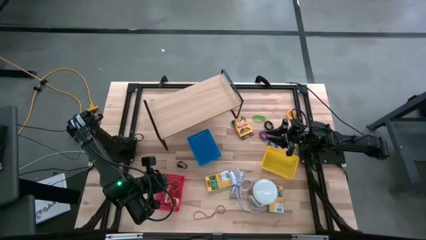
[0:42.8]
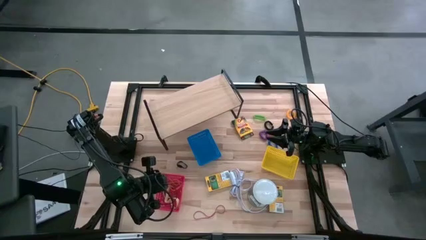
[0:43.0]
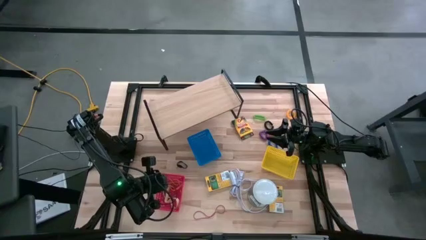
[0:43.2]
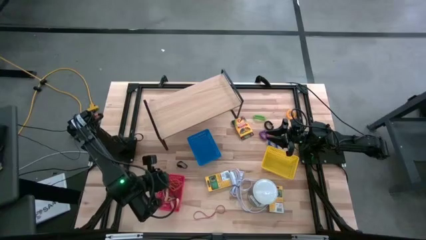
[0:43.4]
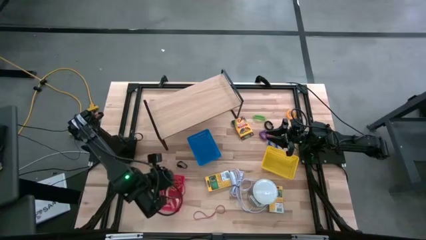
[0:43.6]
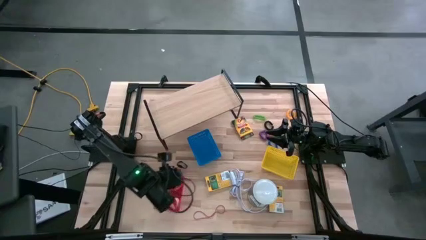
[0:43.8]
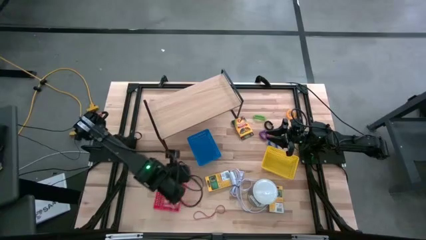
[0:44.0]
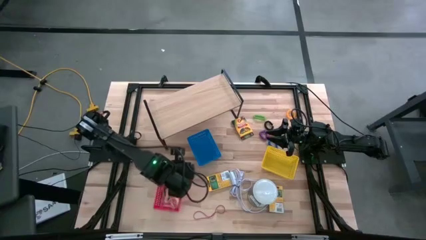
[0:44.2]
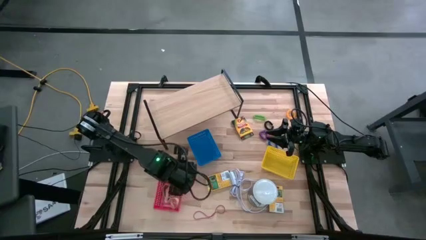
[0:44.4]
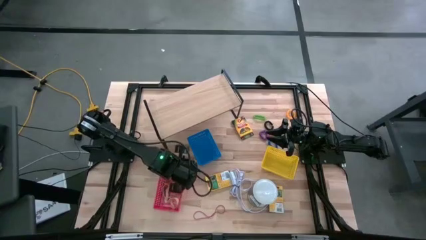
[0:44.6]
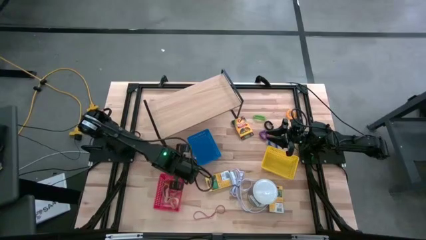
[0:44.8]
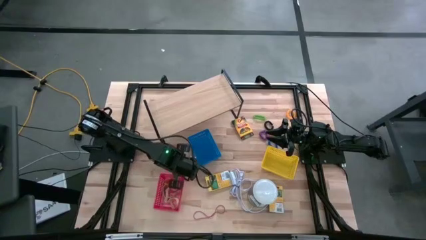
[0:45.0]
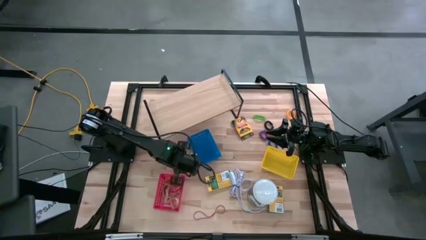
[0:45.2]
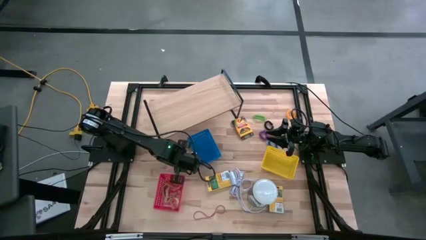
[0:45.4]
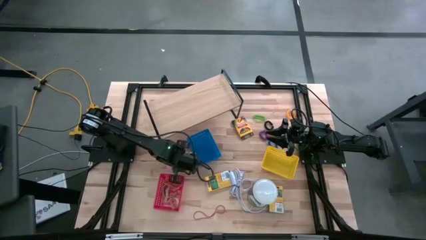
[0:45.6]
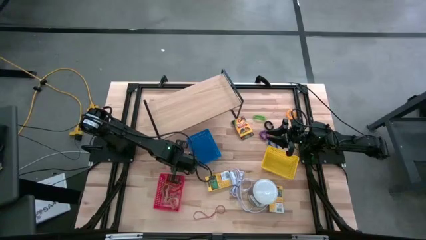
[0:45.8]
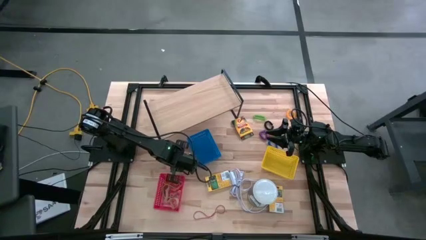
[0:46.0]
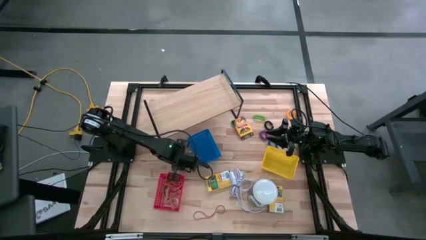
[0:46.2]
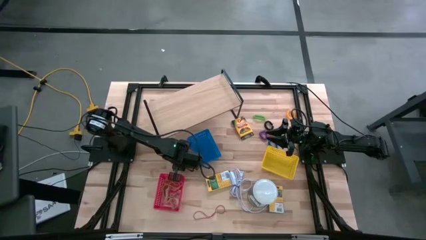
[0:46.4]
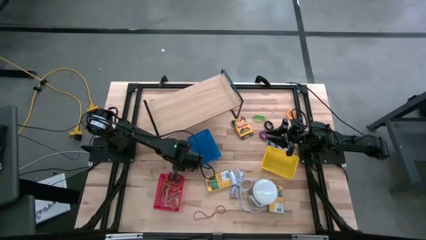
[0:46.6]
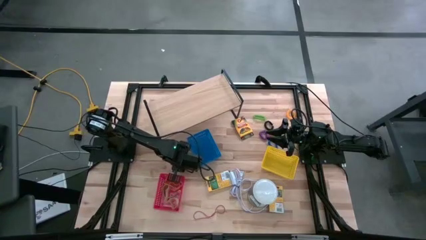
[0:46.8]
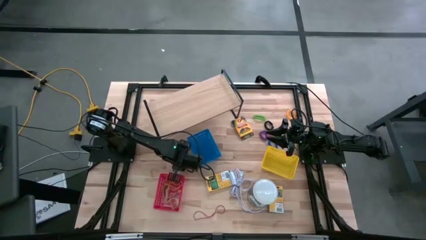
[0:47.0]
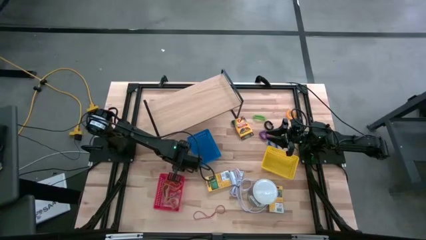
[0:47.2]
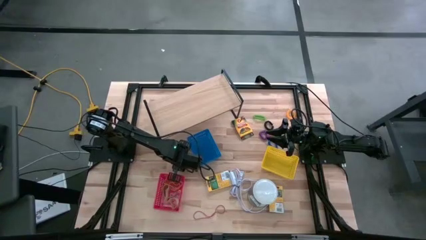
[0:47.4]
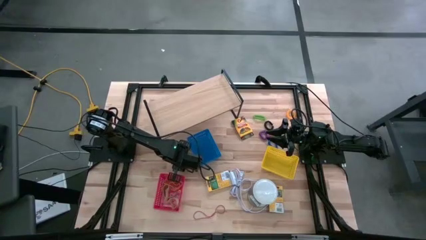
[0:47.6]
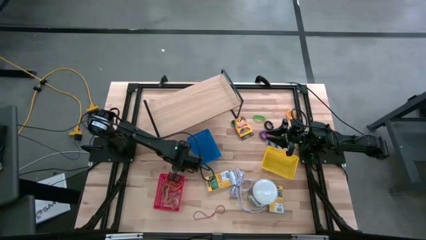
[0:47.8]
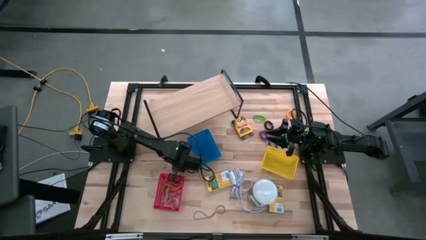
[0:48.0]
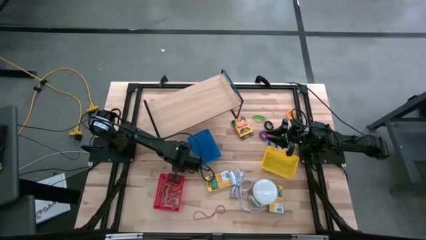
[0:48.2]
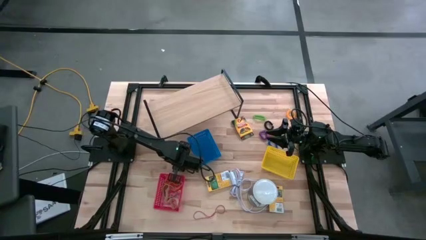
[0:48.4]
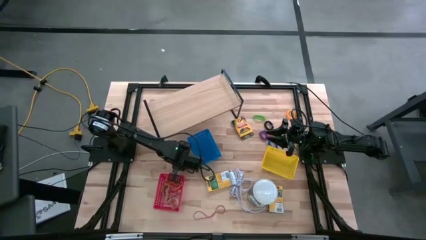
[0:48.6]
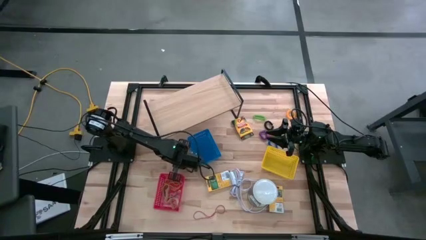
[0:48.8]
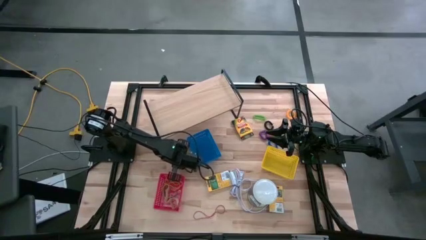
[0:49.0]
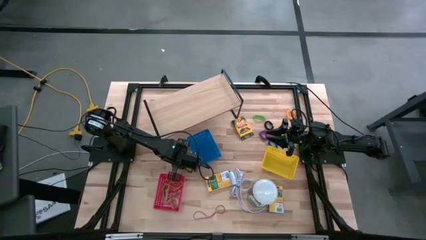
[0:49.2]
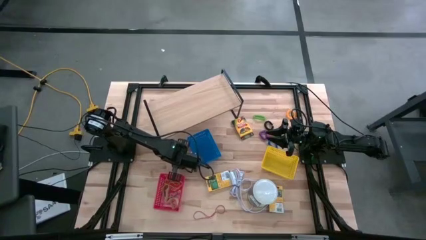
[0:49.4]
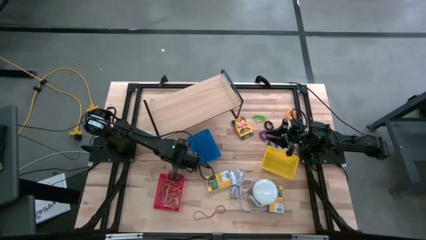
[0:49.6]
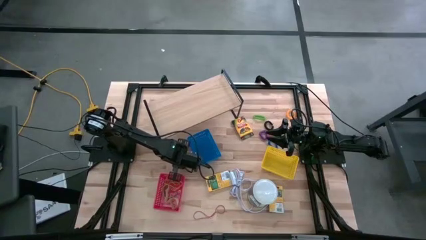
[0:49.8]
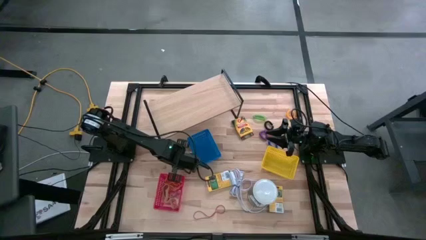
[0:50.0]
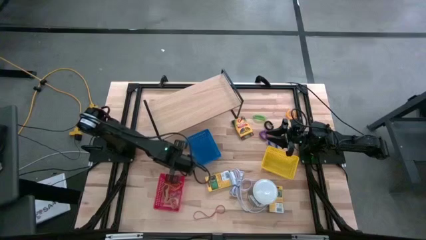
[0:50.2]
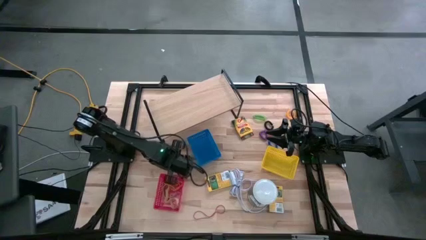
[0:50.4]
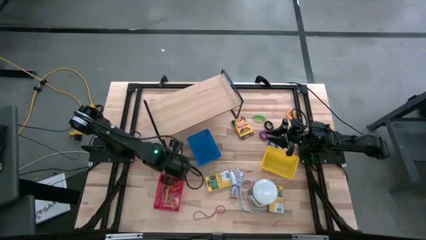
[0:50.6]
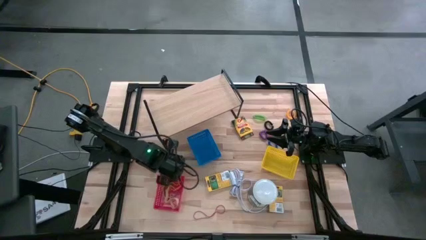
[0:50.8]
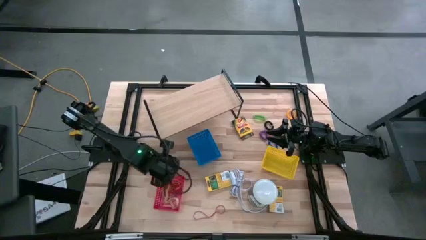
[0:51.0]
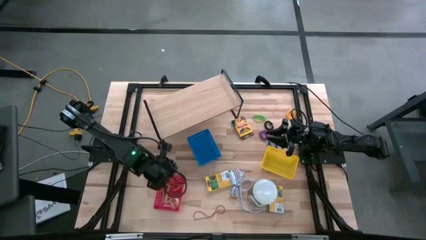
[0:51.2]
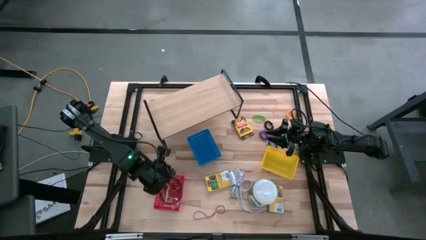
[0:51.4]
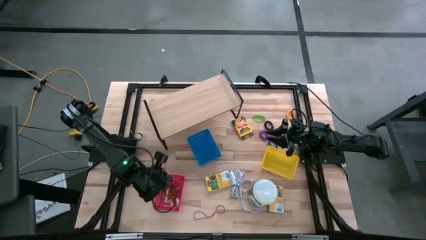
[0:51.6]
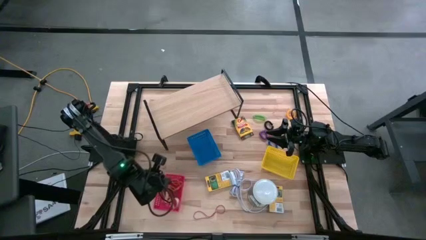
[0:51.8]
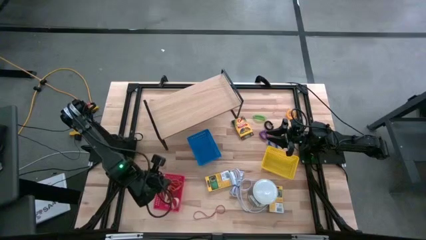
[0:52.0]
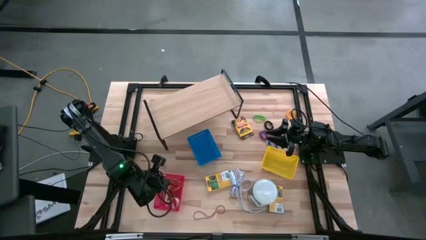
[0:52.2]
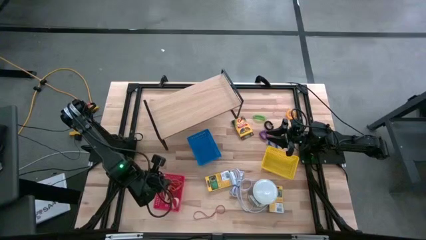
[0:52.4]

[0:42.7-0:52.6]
Task: Pick & Place Office Desk Supplies
Put the black rubber band into the red bin

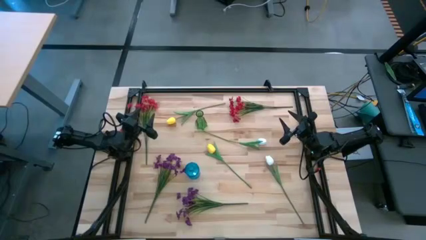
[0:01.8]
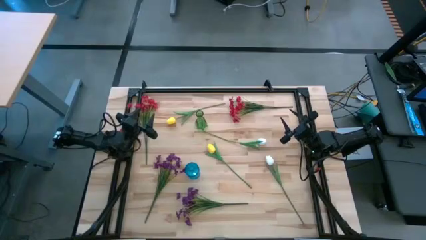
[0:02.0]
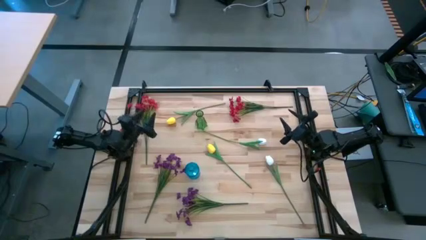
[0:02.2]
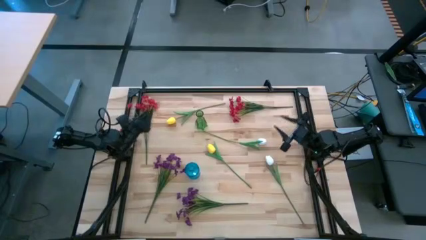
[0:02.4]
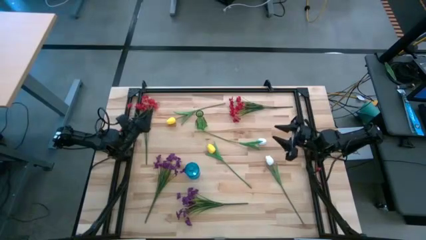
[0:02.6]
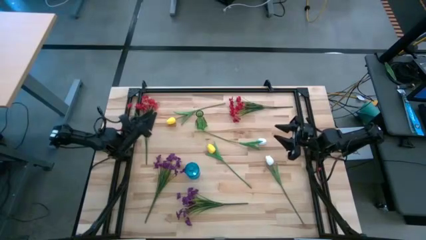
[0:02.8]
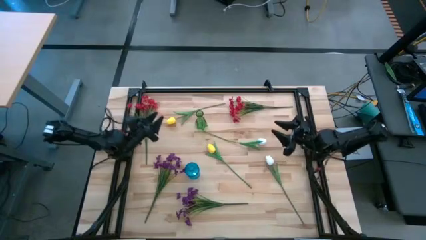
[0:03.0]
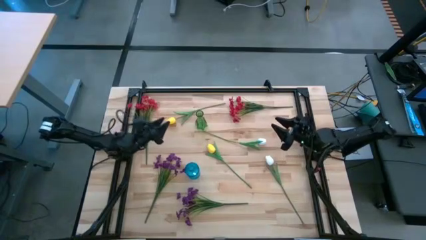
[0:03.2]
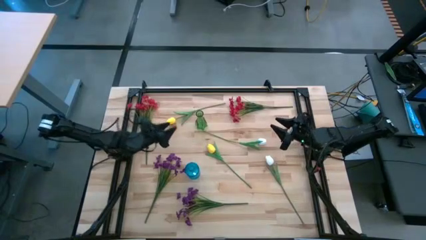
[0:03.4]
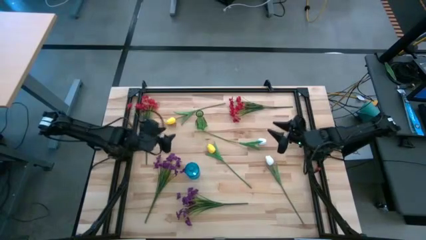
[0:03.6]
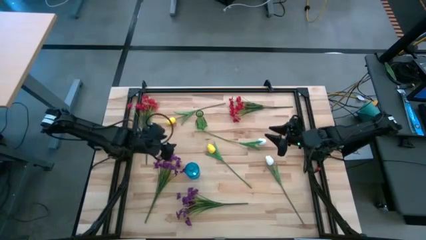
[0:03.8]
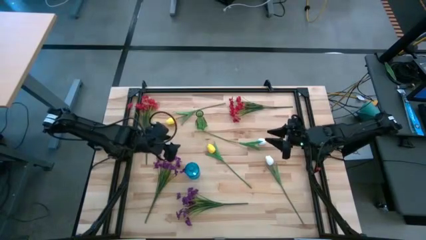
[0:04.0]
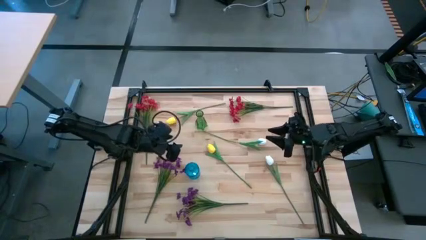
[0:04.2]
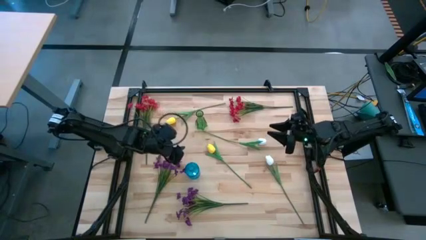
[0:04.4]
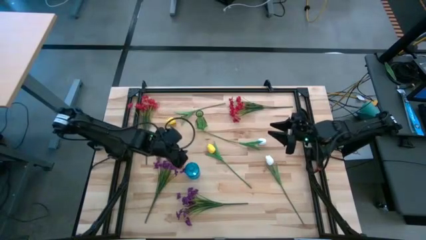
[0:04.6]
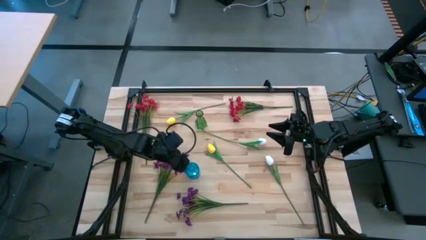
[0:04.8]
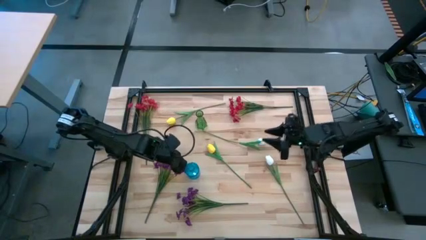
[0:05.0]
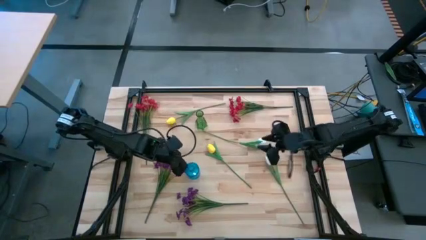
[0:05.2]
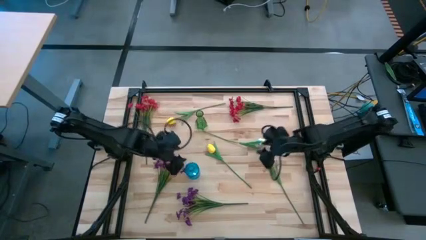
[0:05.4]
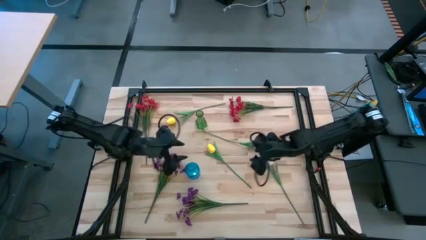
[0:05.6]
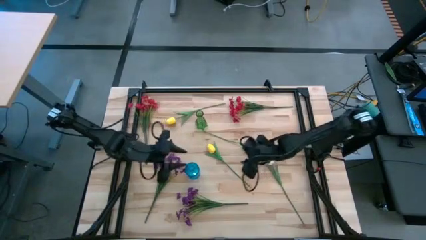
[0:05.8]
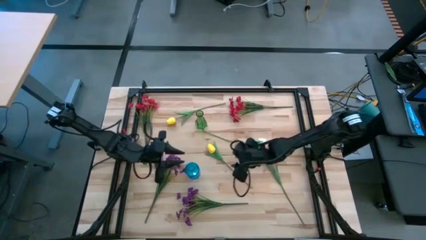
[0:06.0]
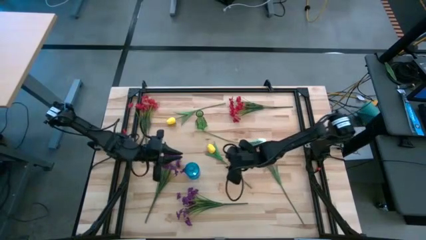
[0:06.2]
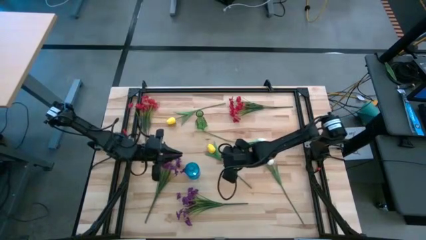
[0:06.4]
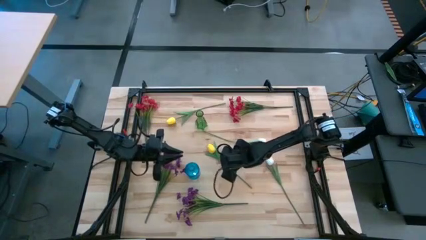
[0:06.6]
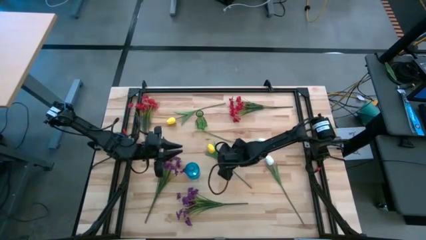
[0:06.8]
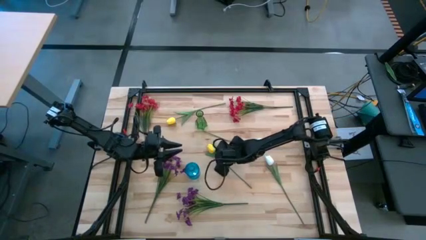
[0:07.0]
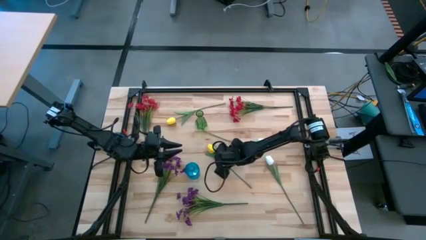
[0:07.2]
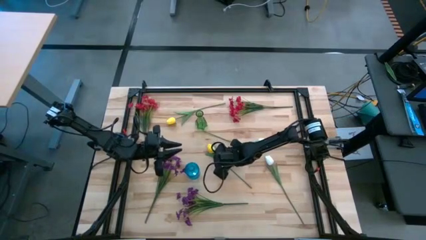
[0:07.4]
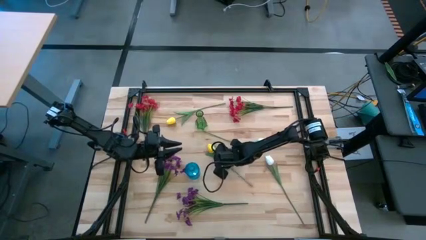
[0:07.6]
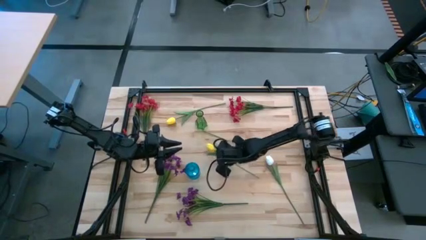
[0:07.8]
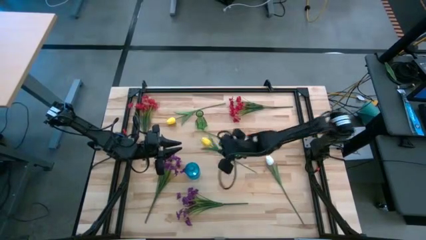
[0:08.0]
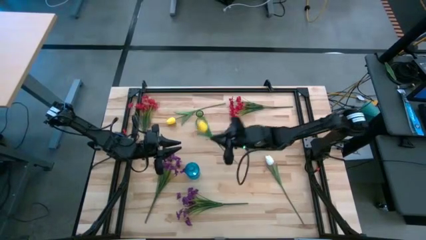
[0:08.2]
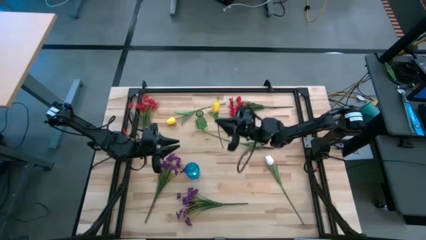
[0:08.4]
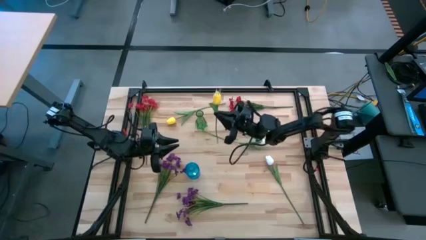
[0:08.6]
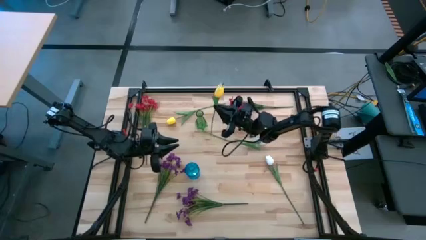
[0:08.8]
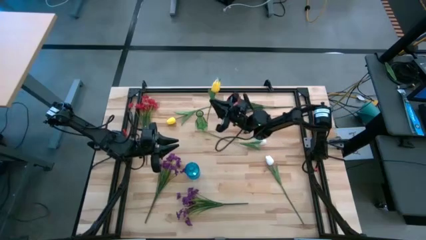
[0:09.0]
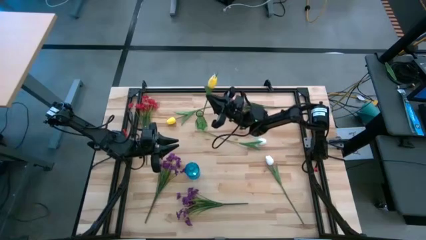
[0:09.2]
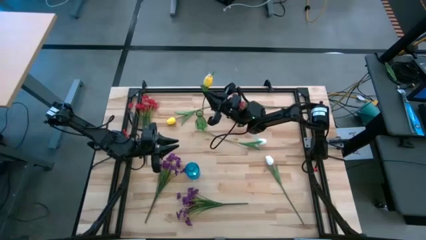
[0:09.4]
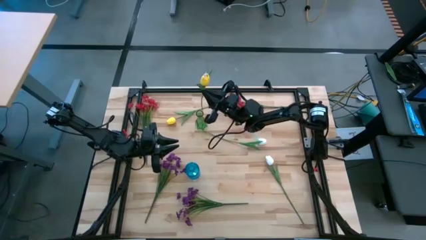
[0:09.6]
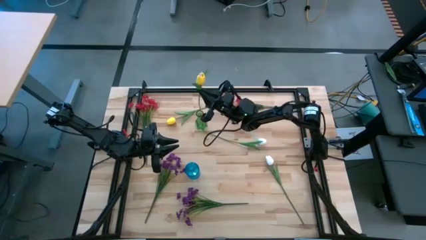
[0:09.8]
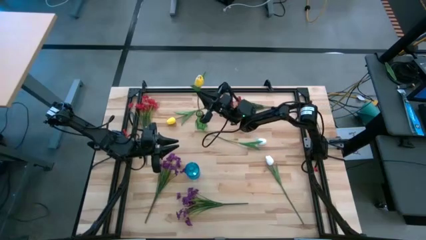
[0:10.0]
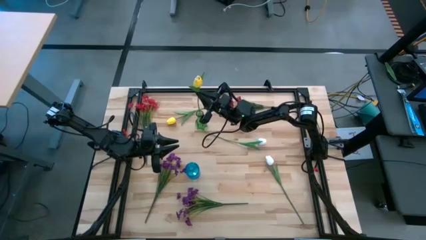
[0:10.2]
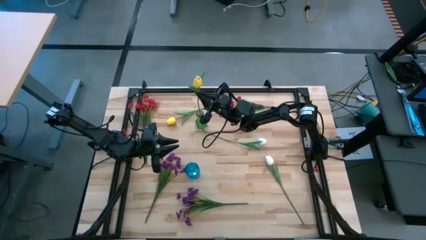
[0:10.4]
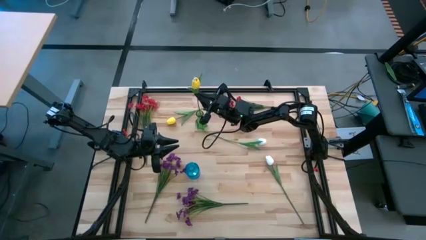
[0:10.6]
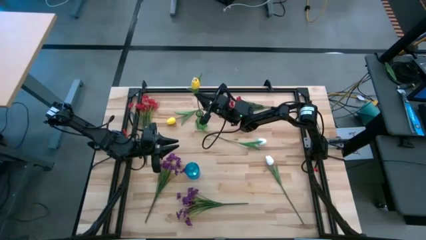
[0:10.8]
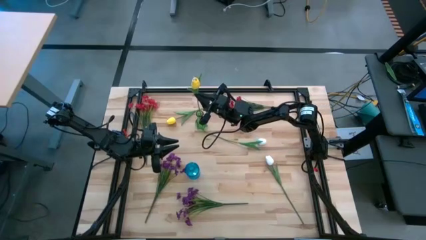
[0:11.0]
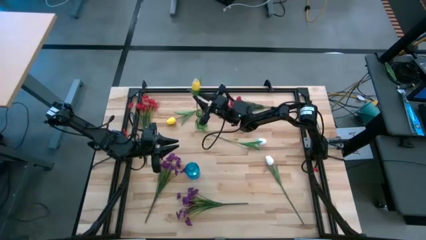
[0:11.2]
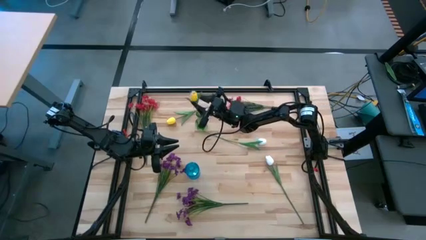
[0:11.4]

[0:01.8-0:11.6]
Task: Sort flowers into vase by color
Put the bottom yellow flower into the green vase
